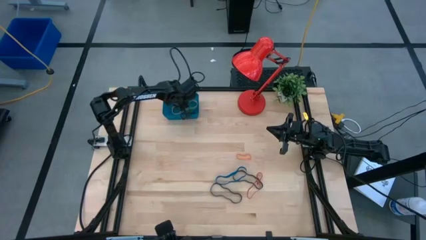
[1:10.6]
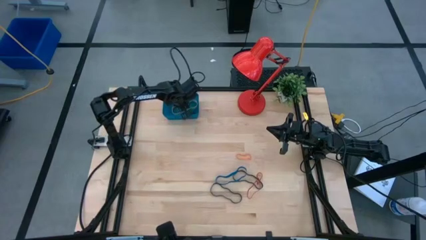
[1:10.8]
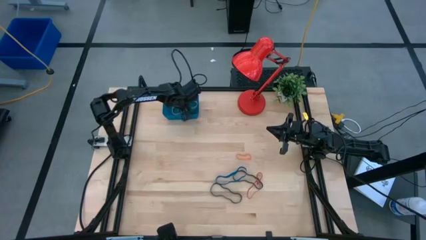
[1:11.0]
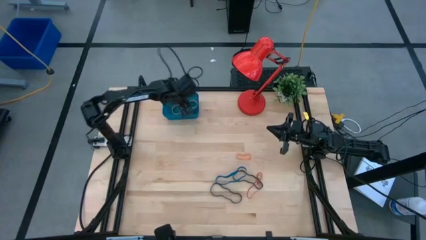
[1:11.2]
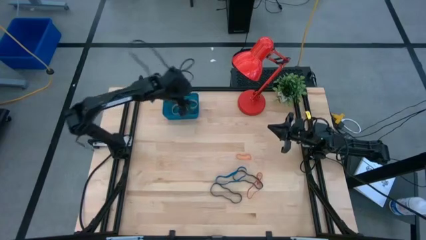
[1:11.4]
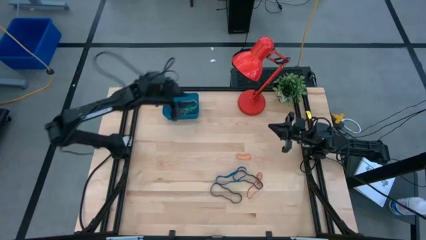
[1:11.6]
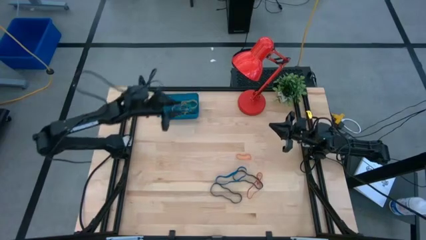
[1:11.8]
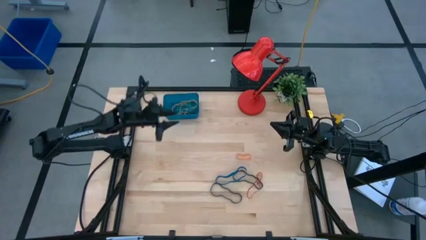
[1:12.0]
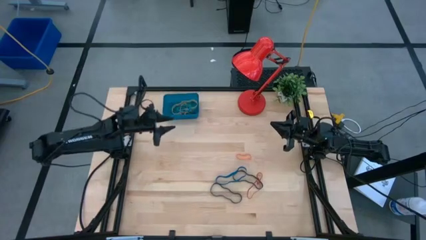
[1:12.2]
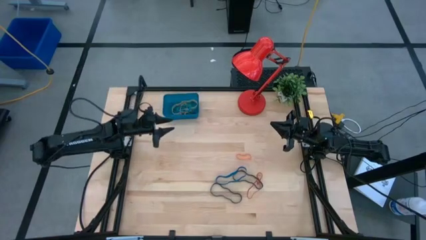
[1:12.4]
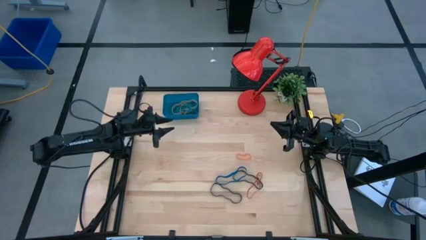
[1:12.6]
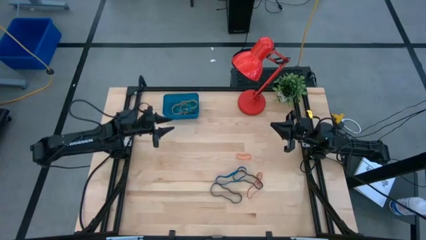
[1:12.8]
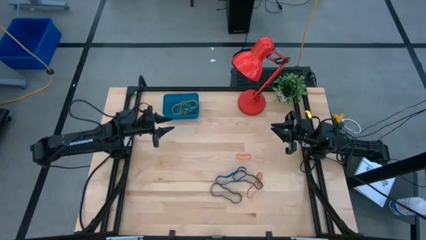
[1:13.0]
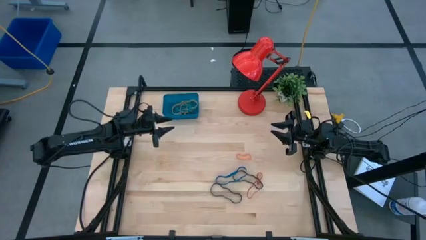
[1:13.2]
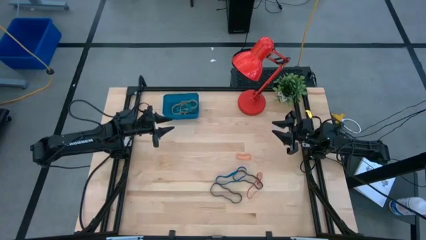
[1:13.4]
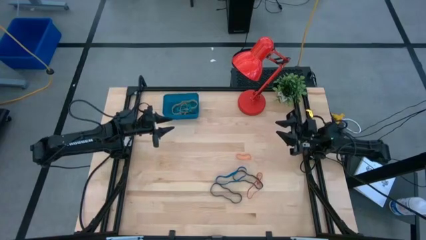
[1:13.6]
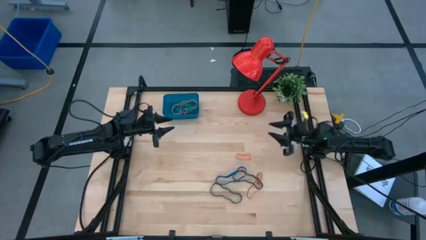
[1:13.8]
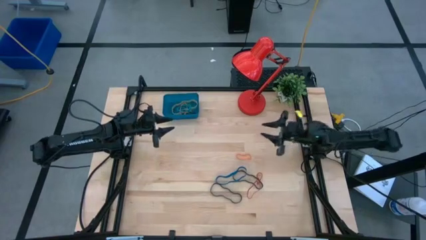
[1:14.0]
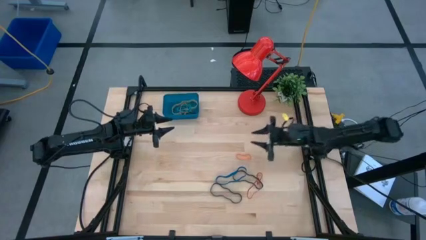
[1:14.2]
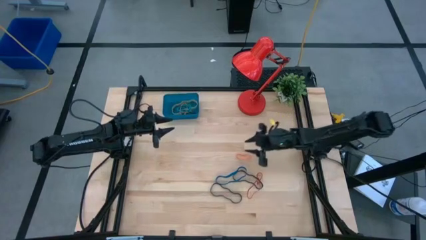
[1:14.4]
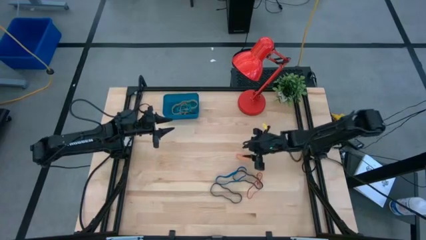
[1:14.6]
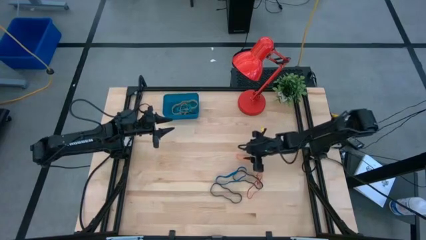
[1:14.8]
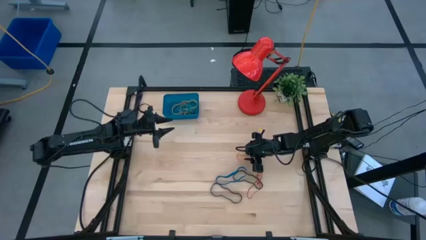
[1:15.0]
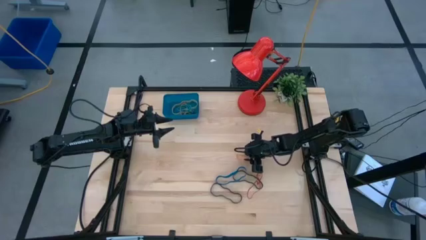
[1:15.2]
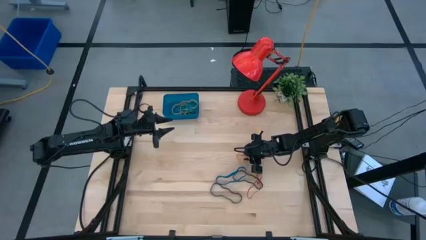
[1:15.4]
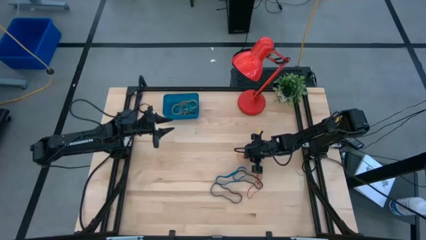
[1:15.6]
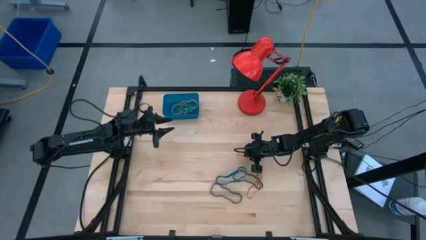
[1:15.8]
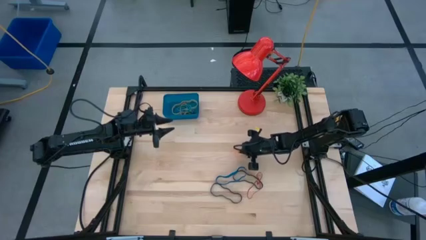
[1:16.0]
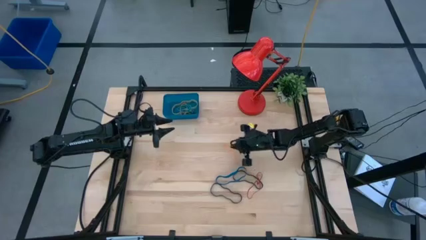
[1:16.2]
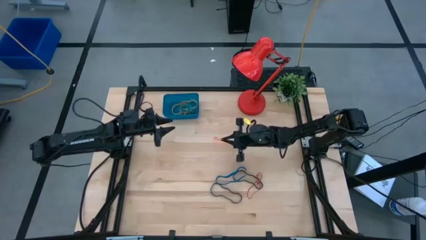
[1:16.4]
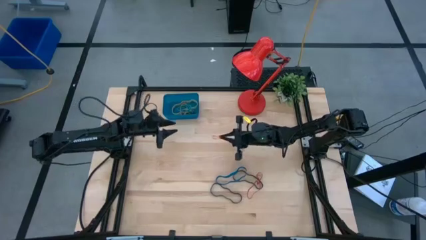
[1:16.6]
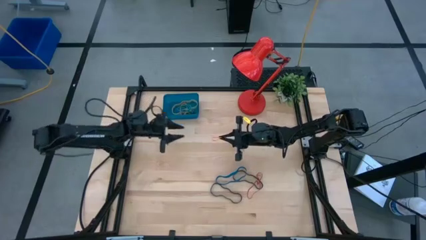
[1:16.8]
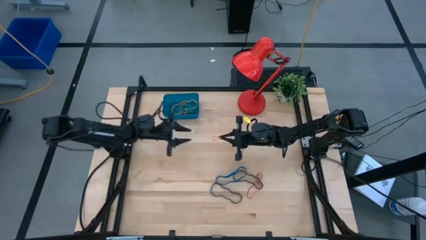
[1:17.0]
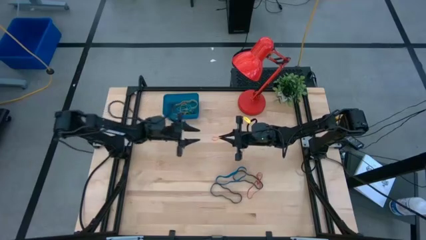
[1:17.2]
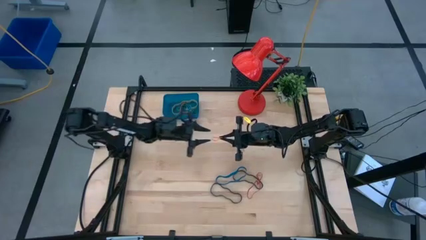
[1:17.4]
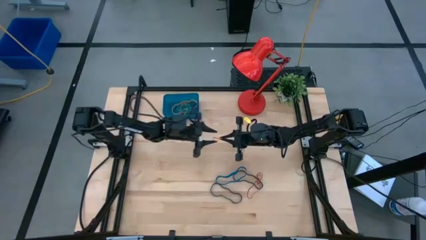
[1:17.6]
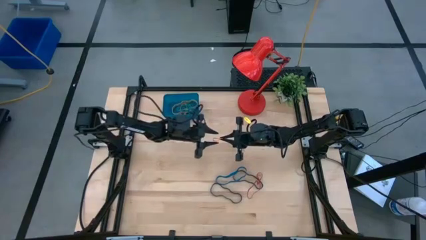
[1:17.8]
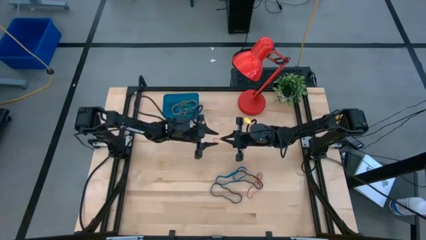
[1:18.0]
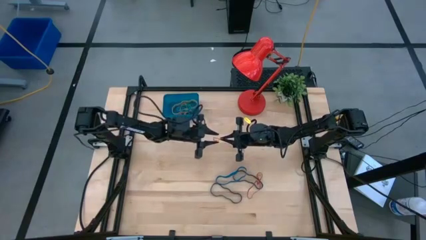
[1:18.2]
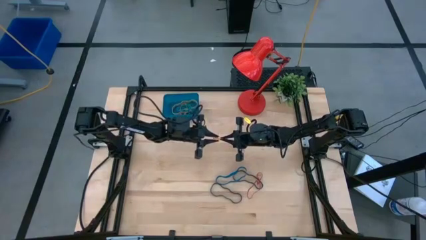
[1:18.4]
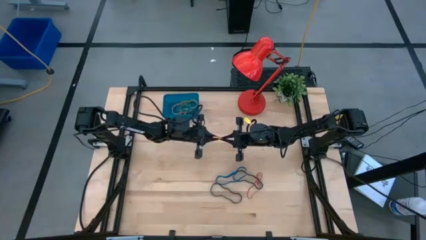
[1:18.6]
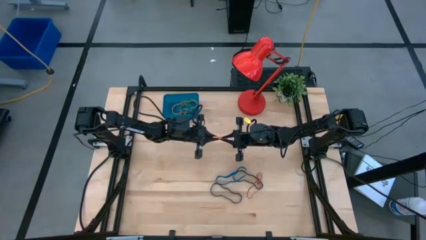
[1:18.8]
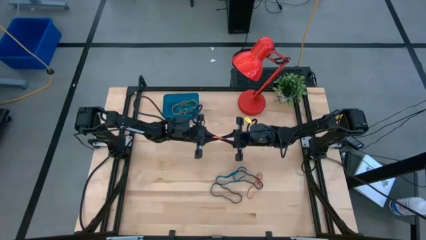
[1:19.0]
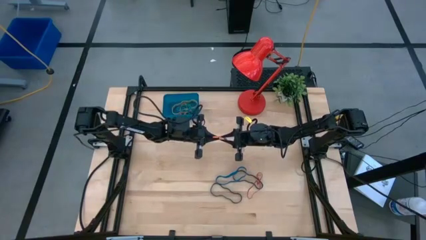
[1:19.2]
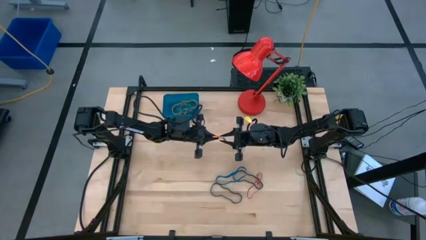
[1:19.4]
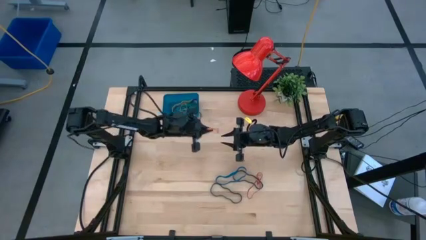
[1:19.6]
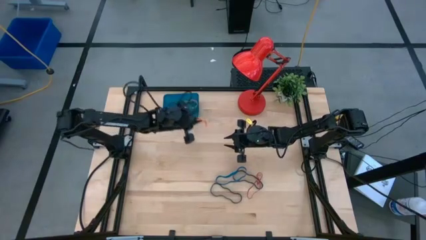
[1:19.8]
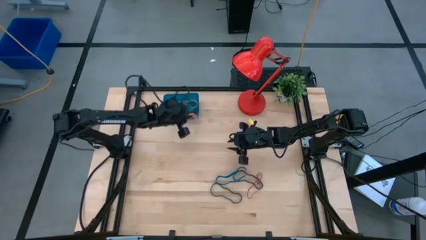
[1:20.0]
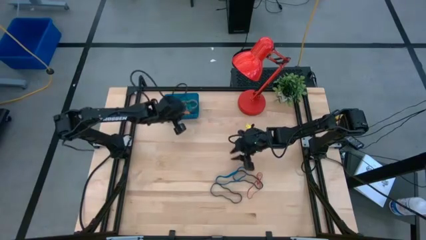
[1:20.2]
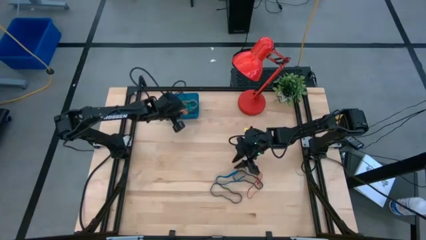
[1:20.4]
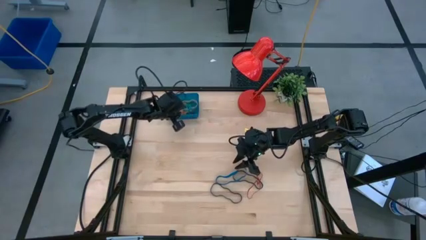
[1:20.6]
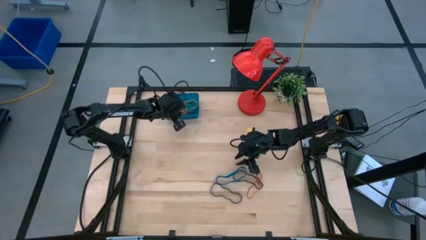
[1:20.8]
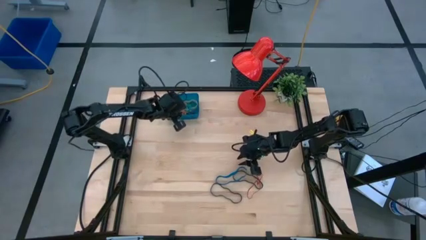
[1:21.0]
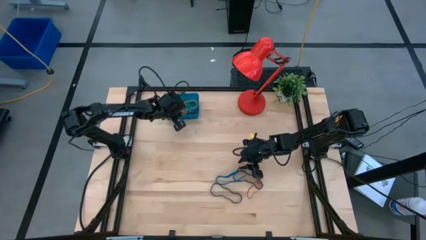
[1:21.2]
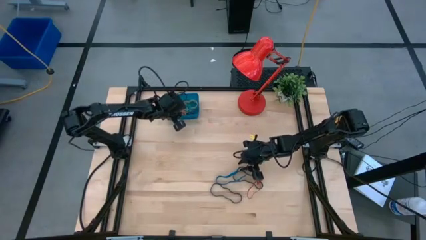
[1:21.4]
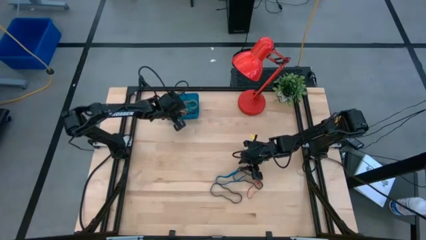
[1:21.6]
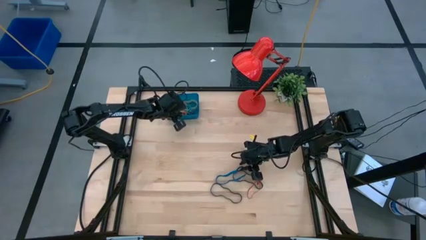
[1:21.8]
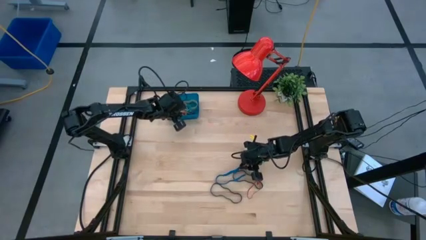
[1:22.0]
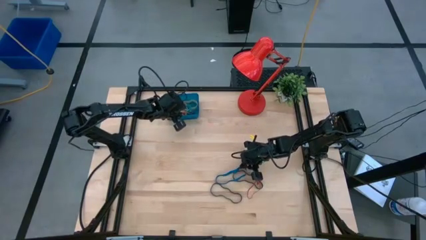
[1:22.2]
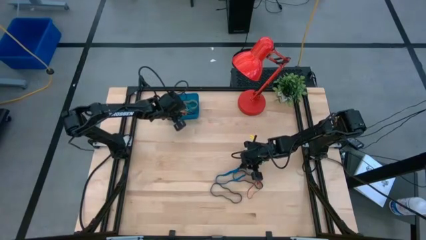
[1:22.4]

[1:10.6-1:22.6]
Task: Pick and place rubber bands into bin
Put the orange rubber band into the blue container
